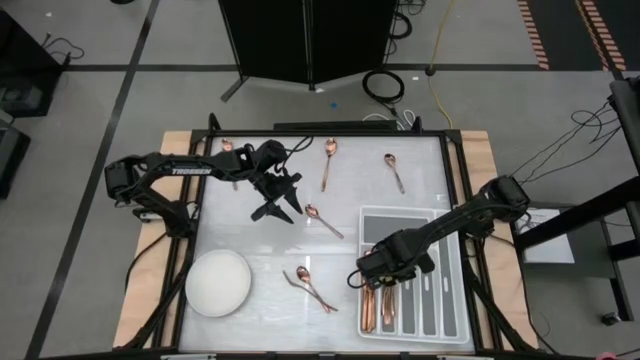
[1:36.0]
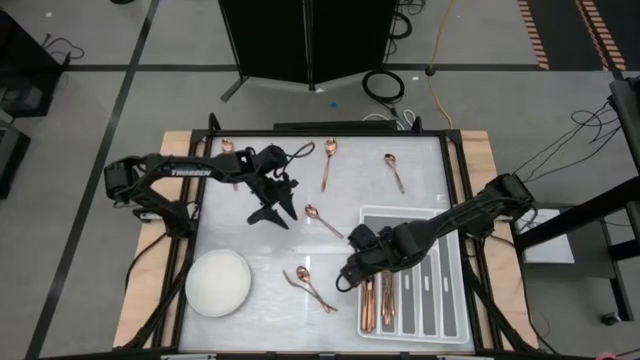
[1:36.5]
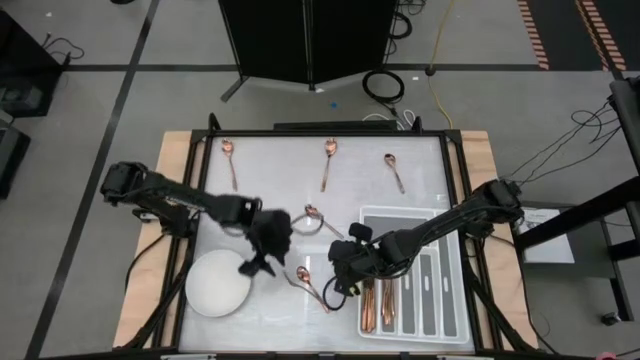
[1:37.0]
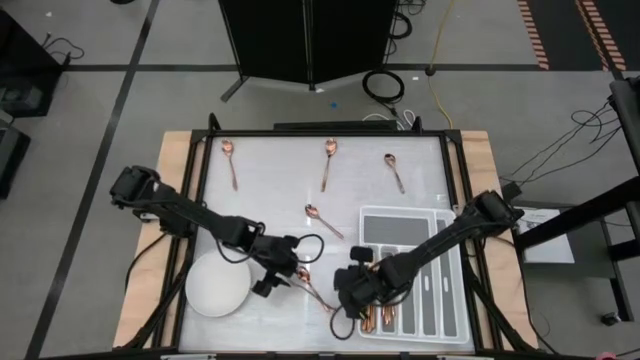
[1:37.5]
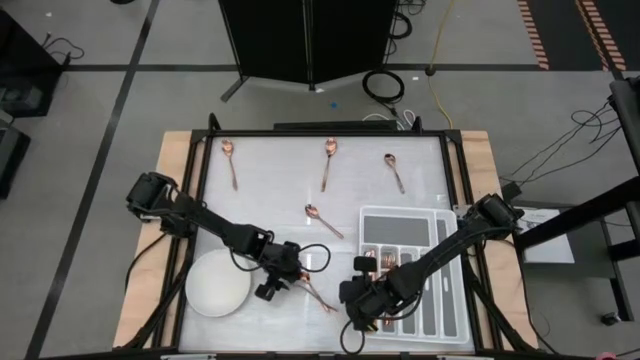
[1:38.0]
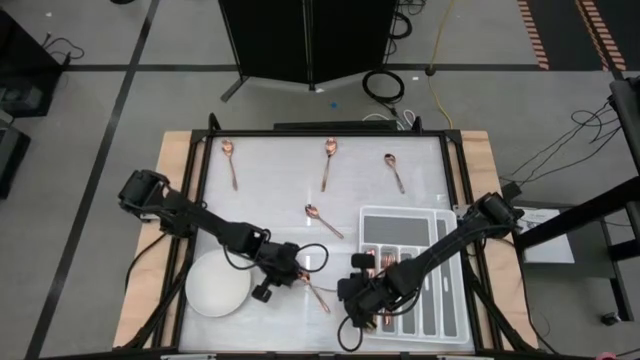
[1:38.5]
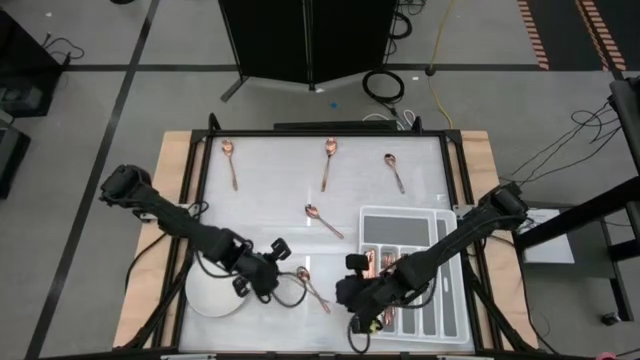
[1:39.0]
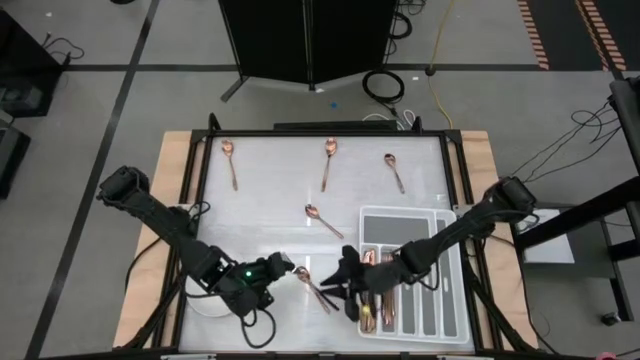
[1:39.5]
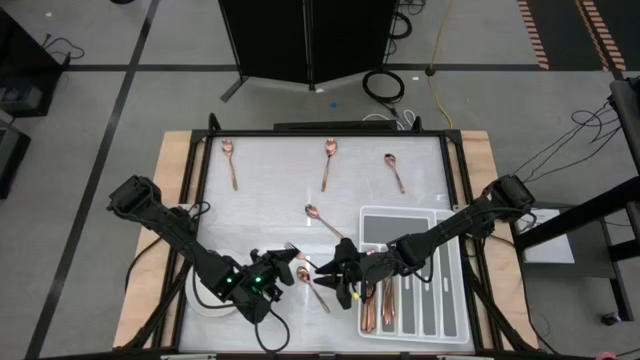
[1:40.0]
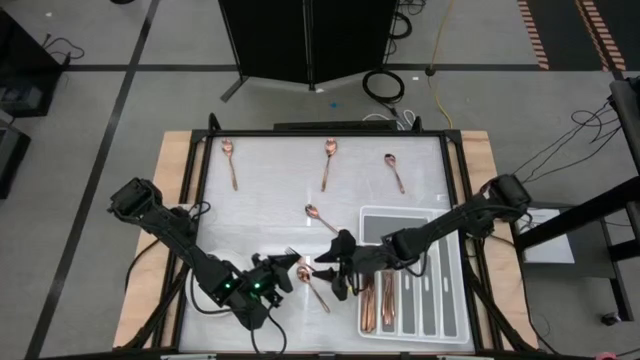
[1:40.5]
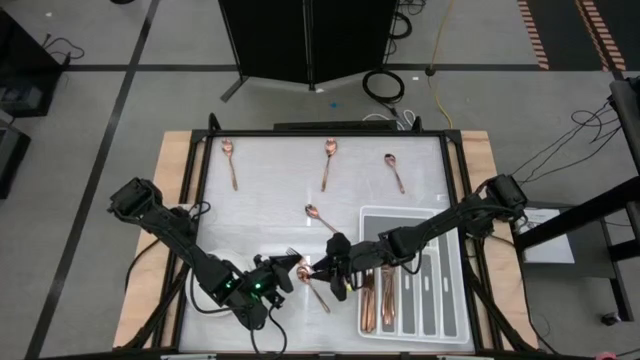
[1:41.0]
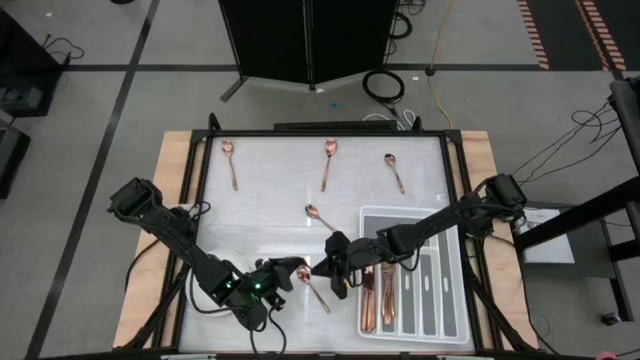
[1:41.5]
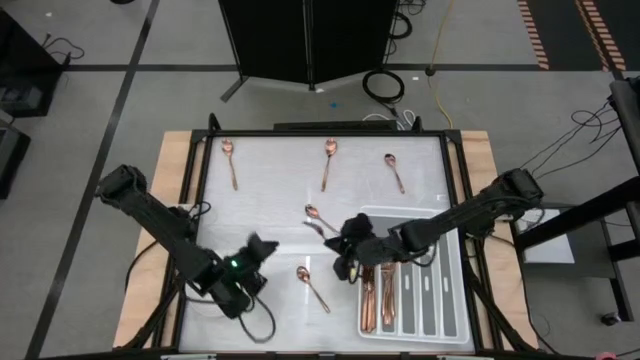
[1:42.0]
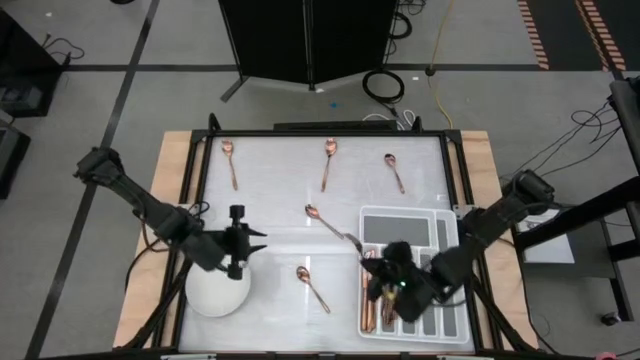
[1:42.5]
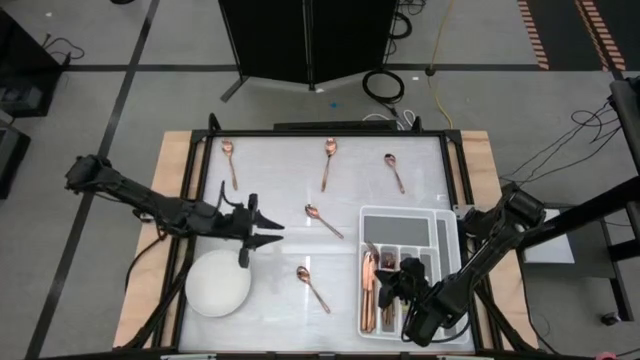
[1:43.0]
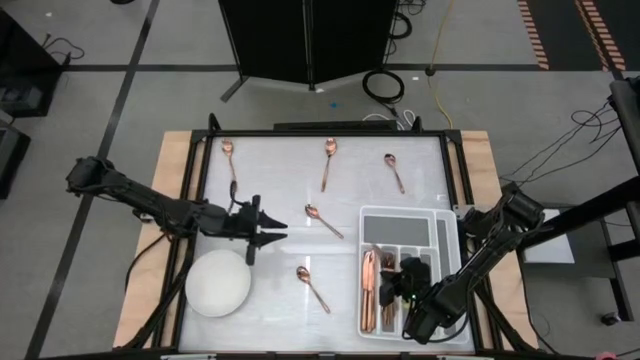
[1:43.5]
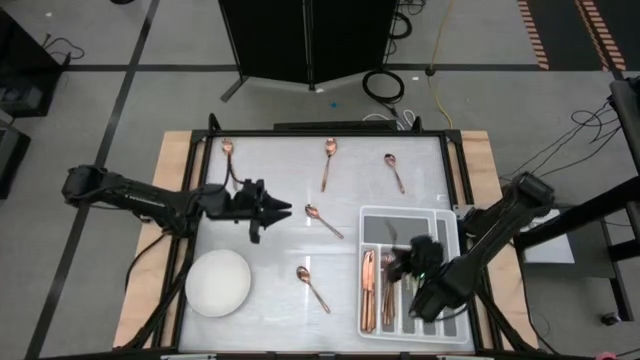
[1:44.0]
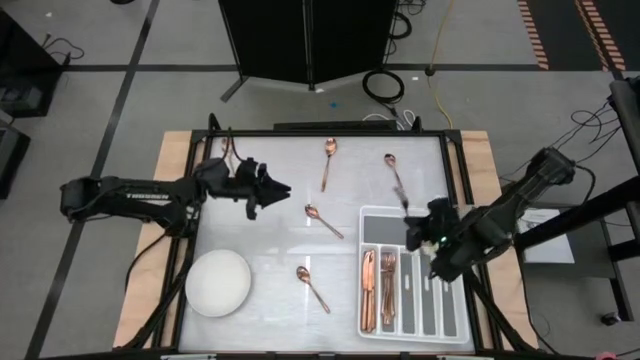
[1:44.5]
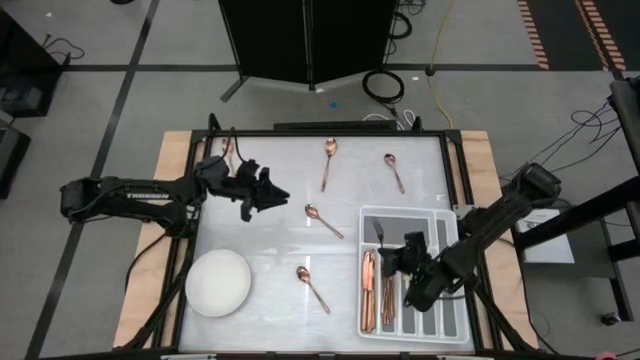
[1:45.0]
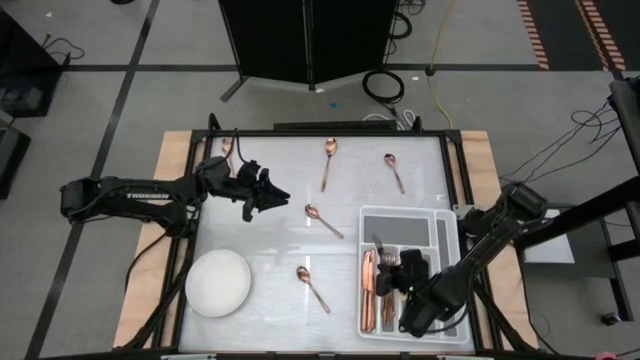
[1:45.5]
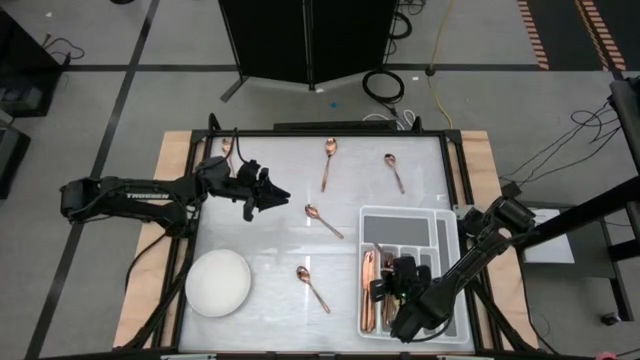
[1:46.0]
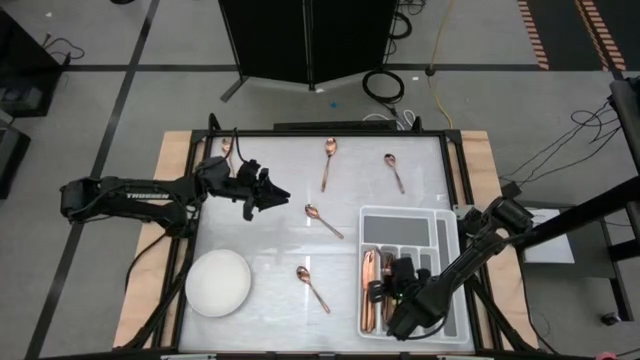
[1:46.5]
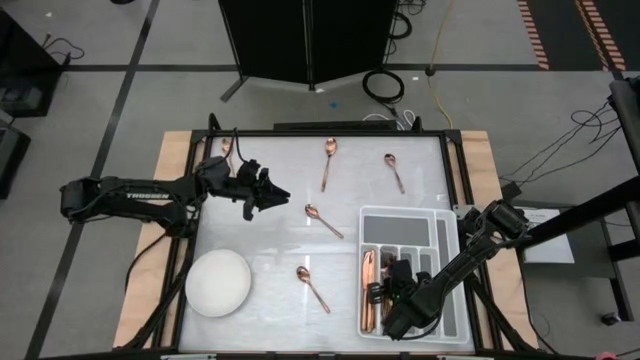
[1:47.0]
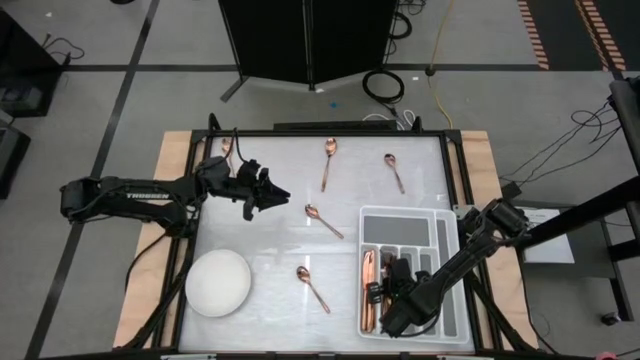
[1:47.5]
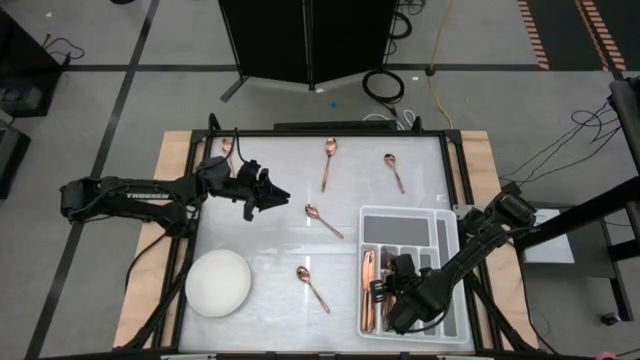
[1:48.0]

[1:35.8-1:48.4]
Task: Sort silverware
Put the brown fork in the white silverware organizer

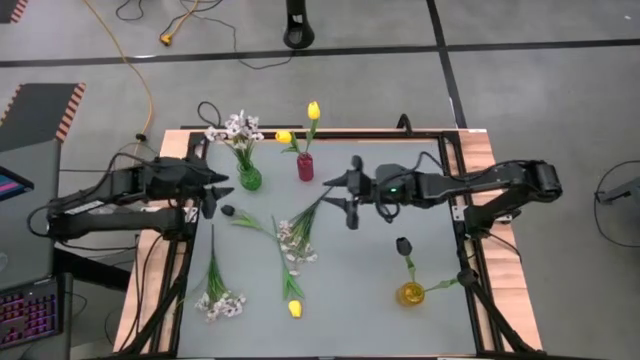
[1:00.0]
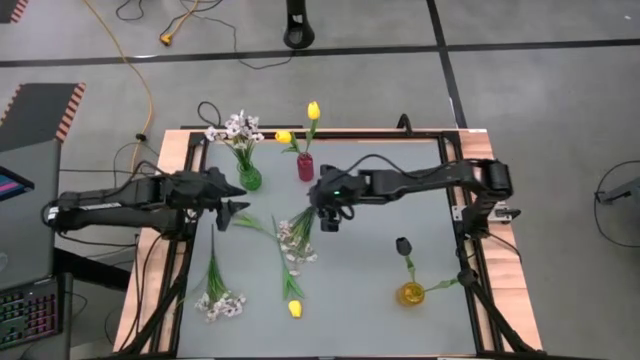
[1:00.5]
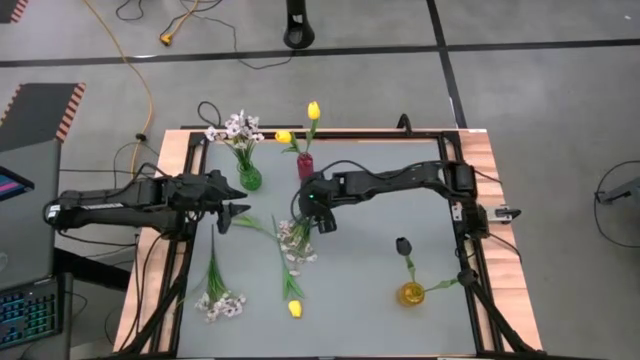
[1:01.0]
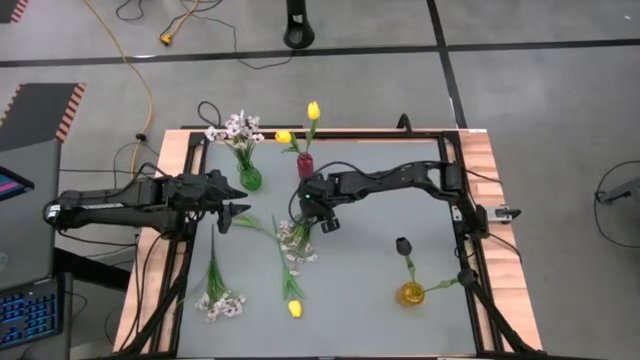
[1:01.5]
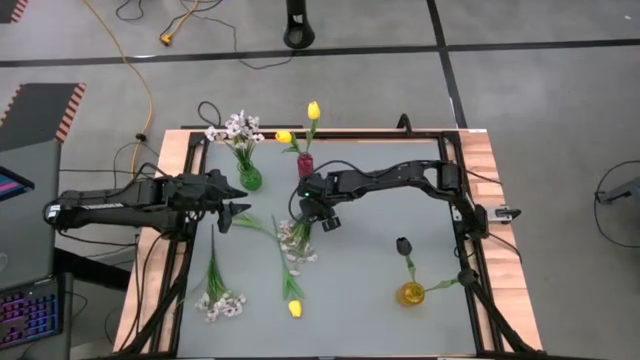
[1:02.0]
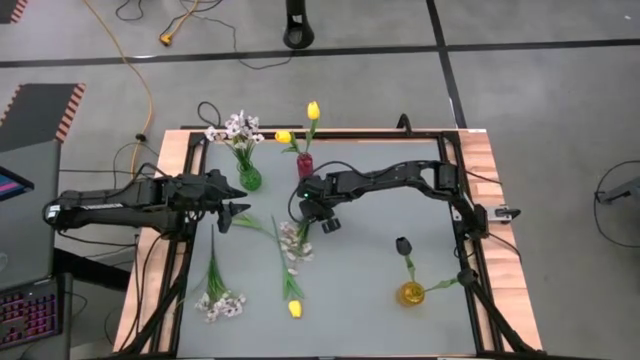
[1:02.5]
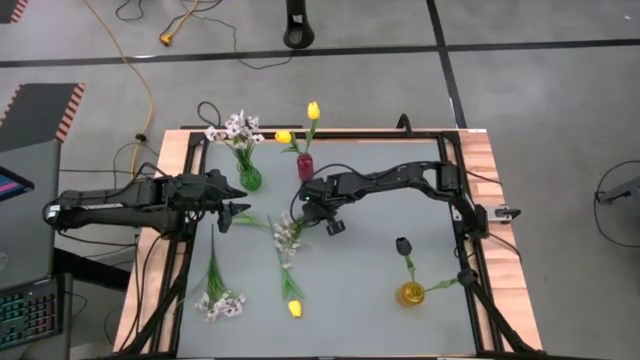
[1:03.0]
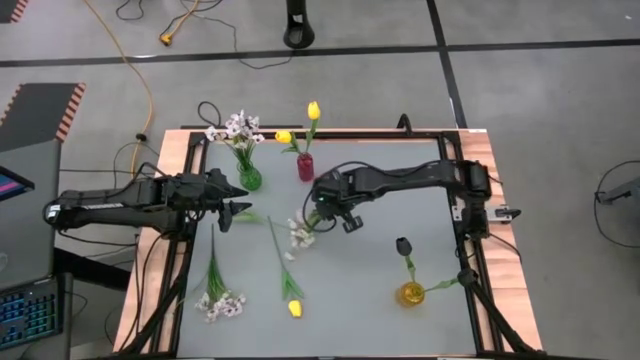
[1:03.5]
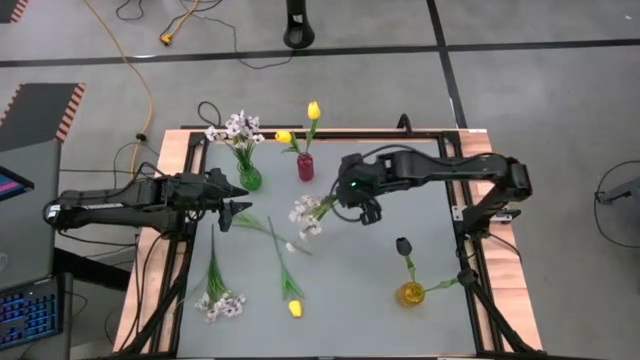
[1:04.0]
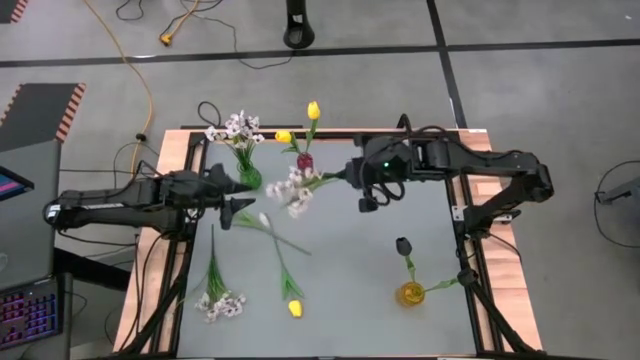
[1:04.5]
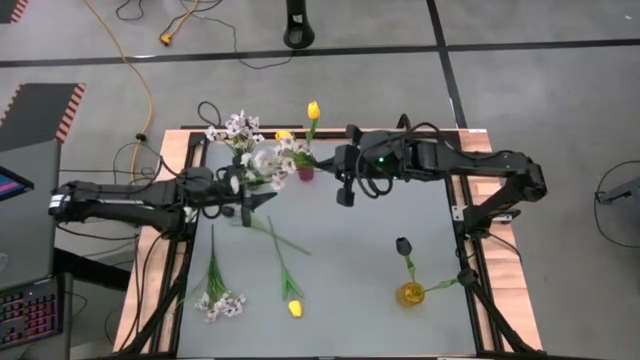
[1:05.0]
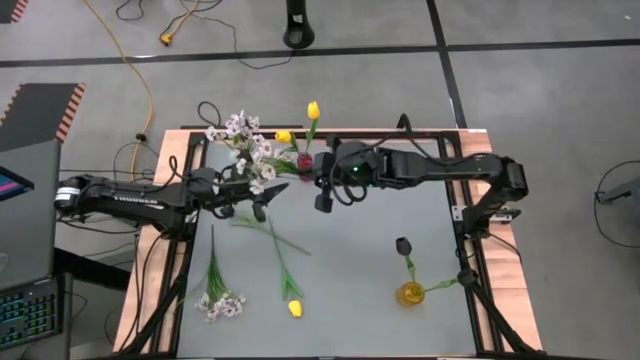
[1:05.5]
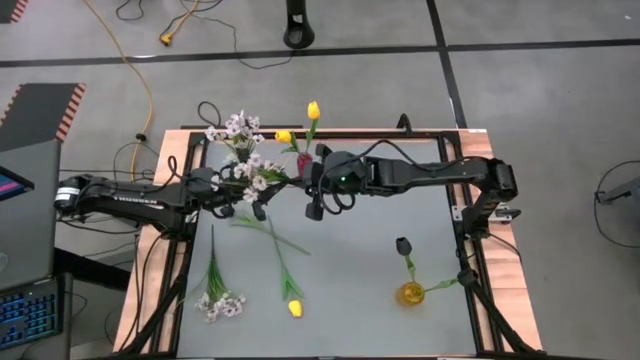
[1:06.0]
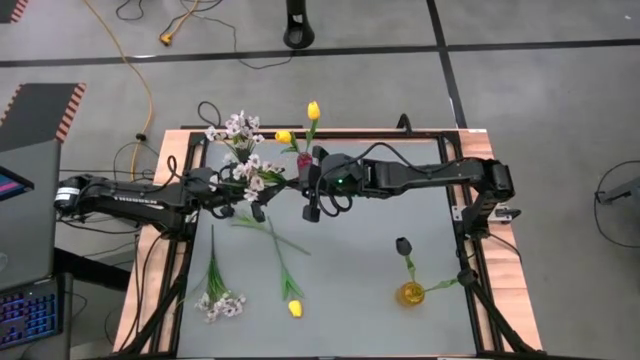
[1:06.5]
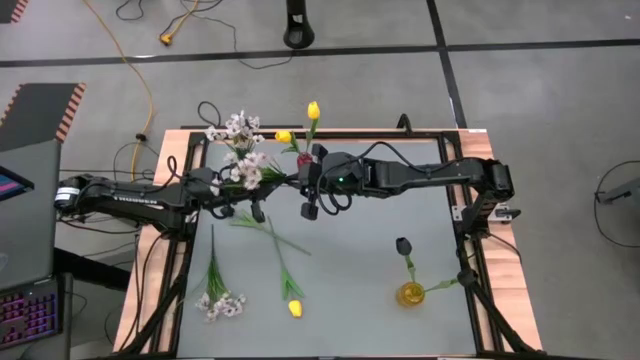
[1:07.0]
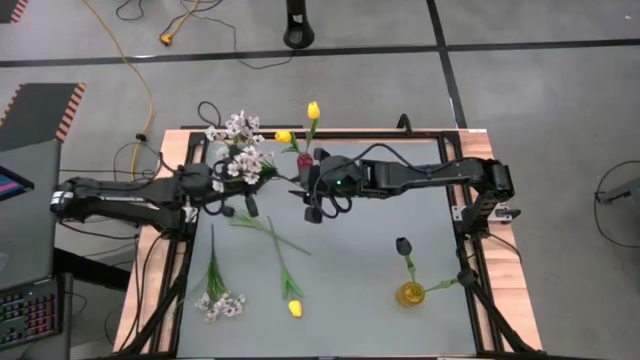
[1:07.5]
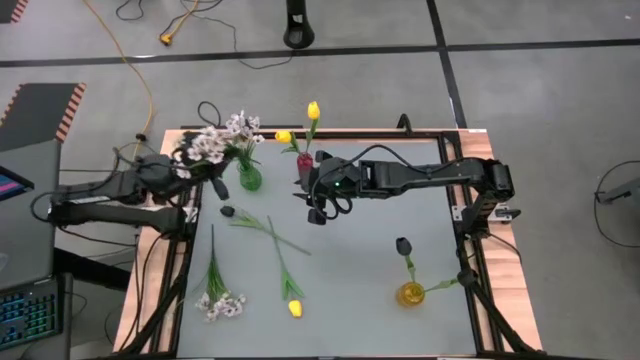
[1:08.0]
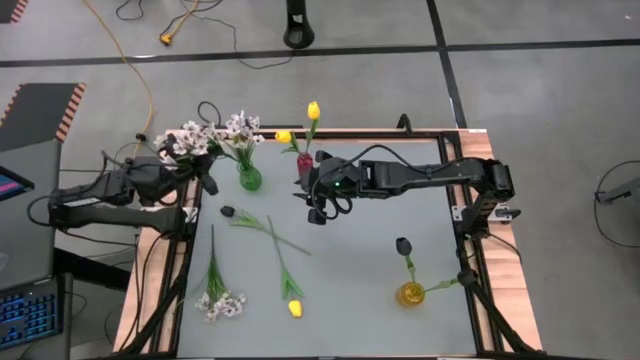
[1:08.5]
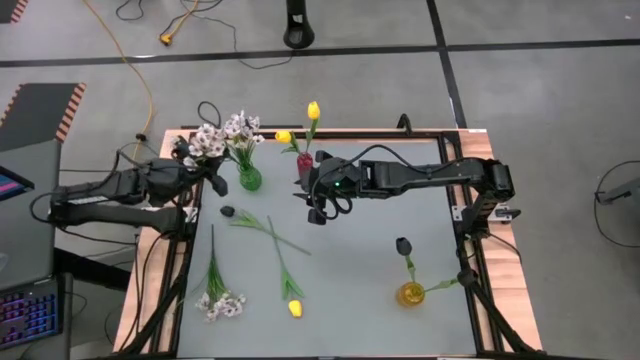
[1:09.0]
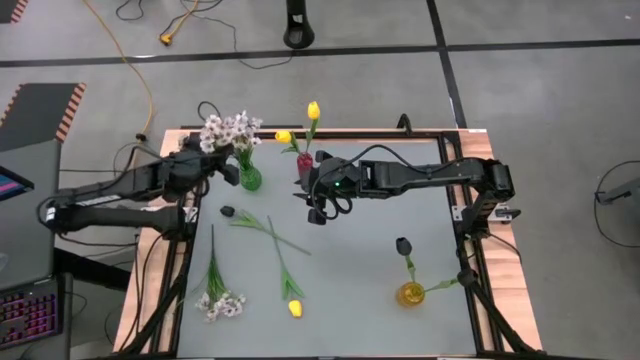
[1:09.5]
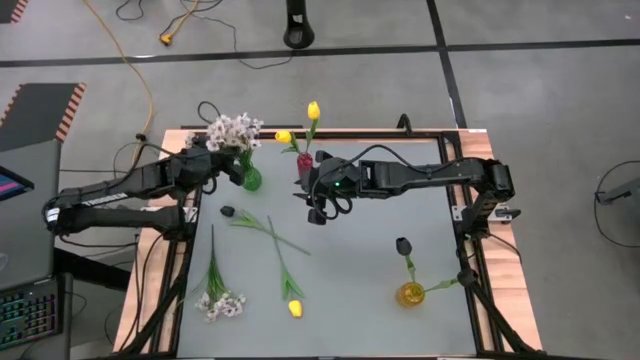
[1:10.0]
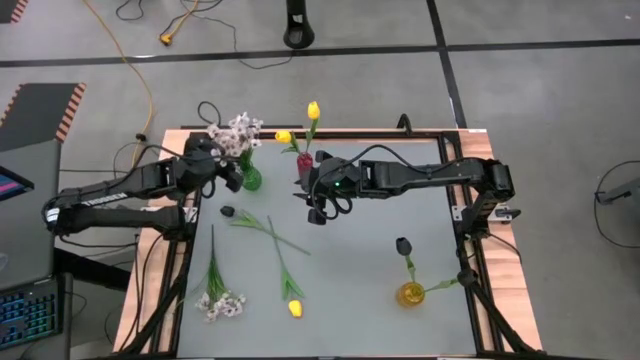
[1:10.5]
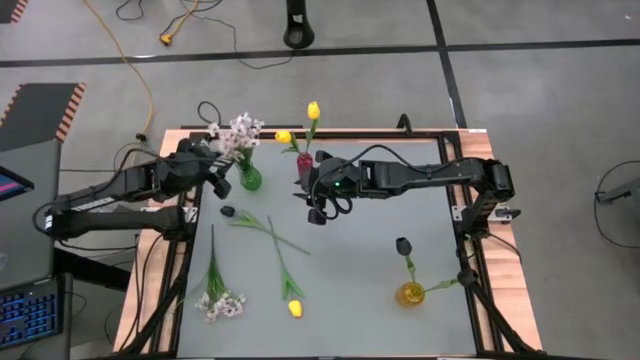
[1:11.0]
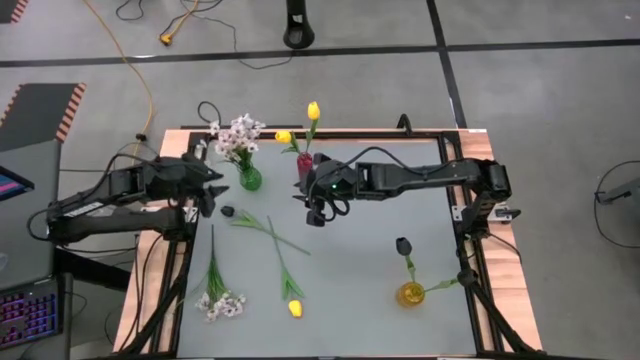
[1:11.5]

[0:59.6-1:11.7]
Task: Sort flowers into vase by color
Put the top white flowers into the green vase
